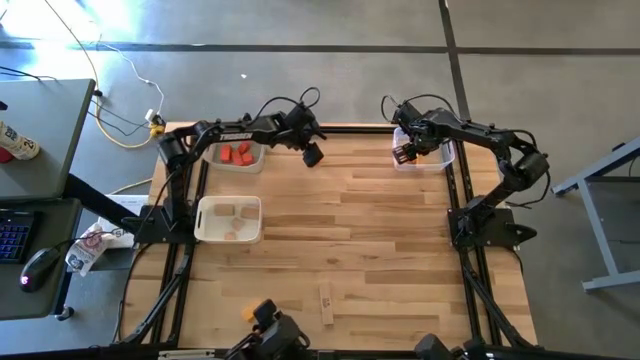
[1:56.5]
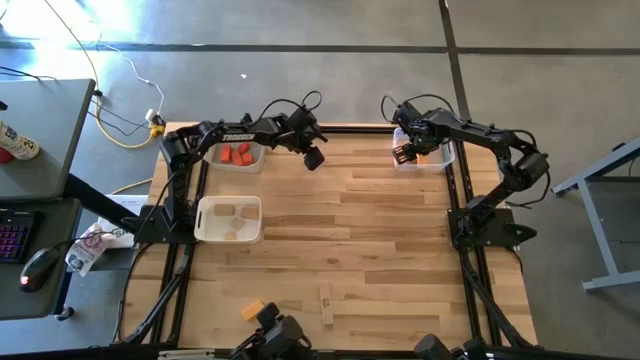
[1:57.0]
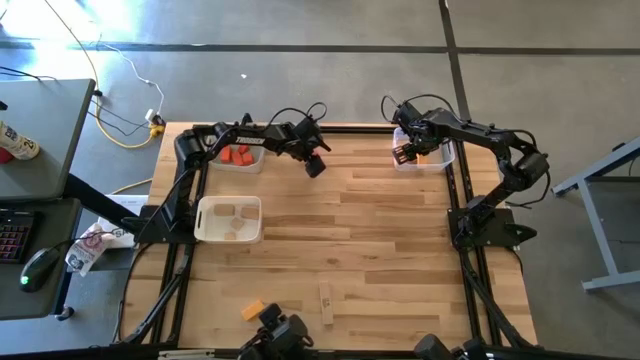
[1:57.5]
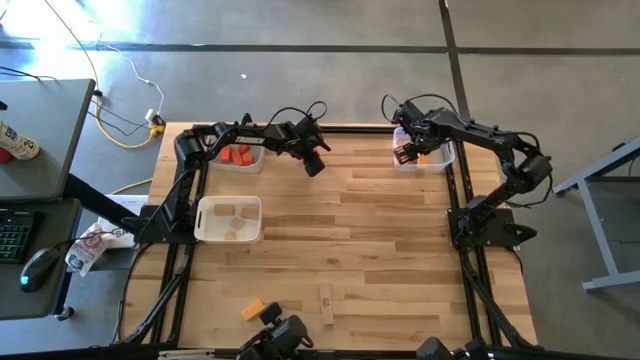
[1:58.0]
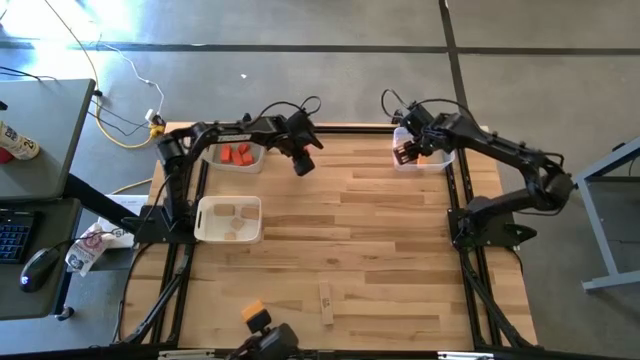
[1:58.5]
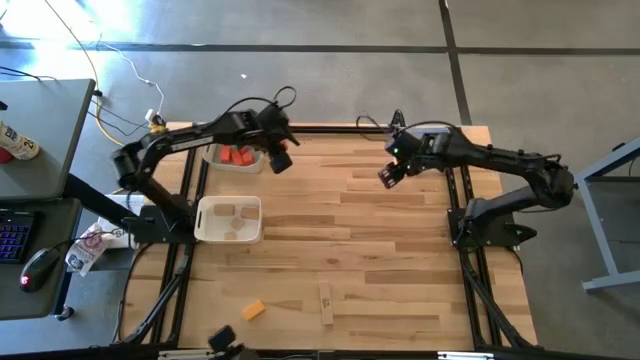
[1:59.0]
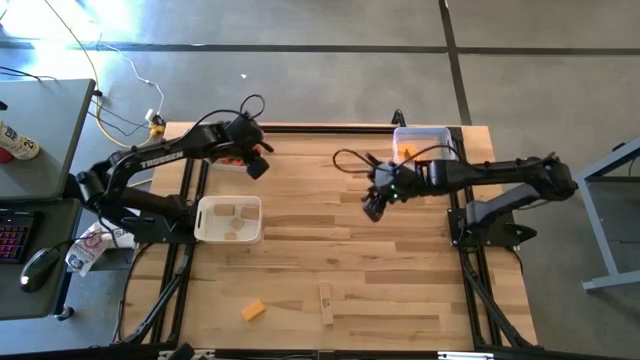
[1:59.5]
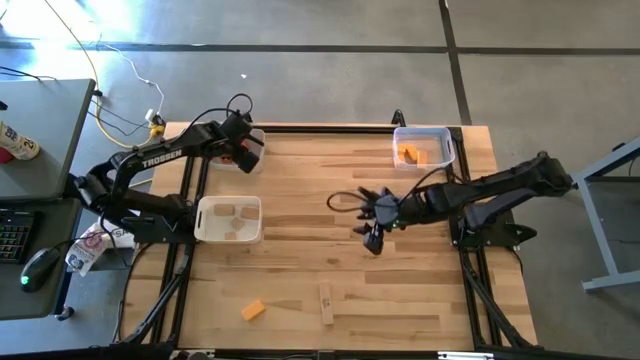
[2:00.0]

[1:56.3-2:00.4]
Task: Sort & place blocks by color
Put the orange block into the gray bin

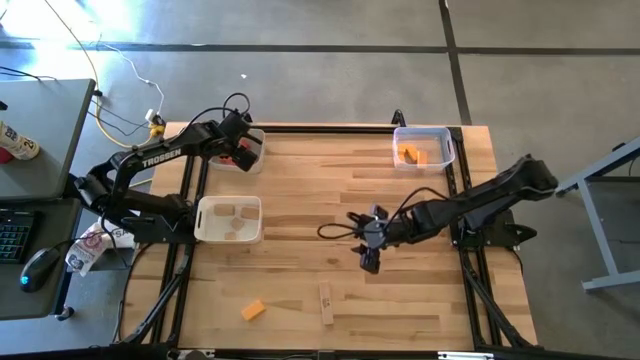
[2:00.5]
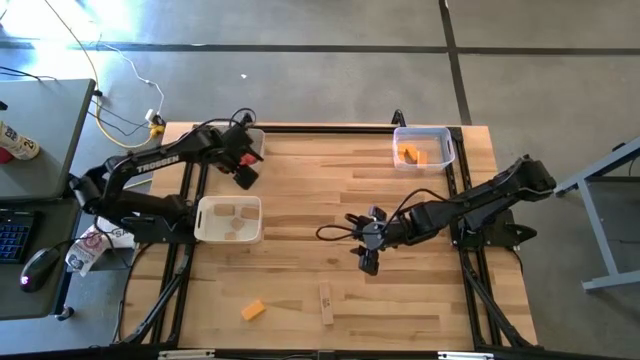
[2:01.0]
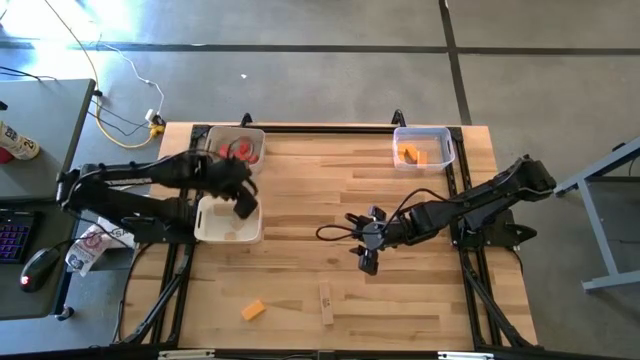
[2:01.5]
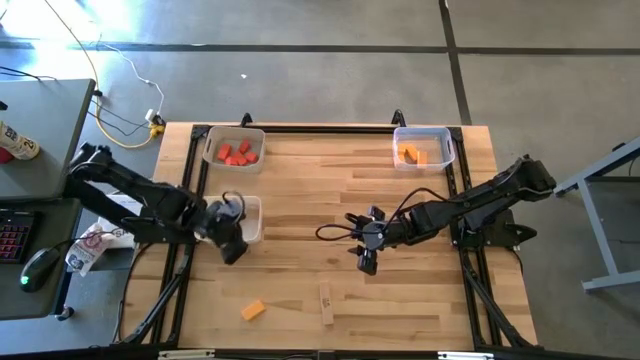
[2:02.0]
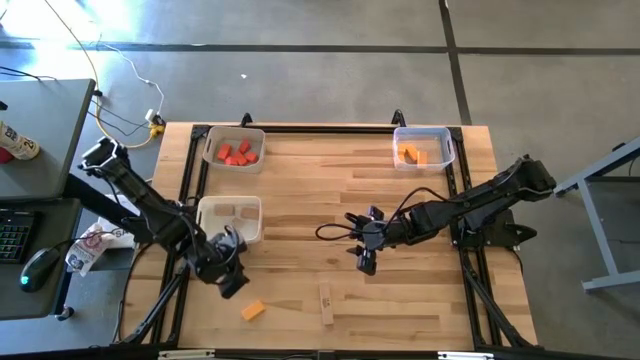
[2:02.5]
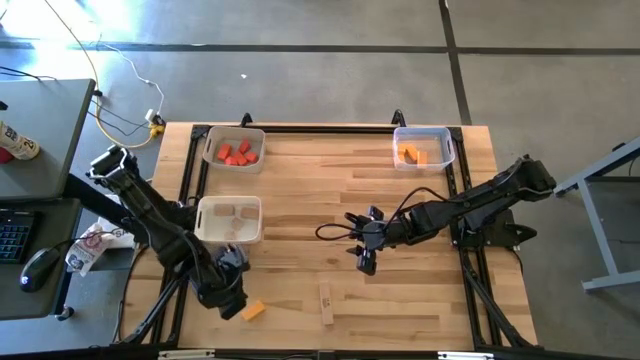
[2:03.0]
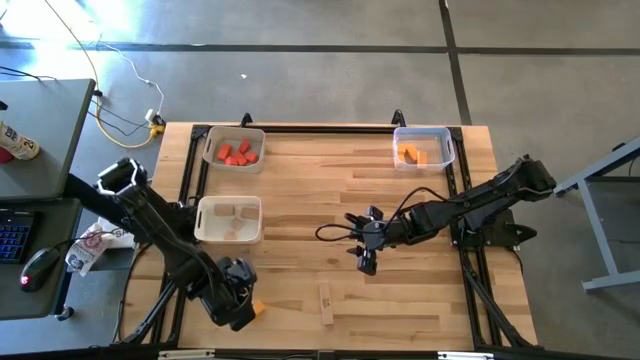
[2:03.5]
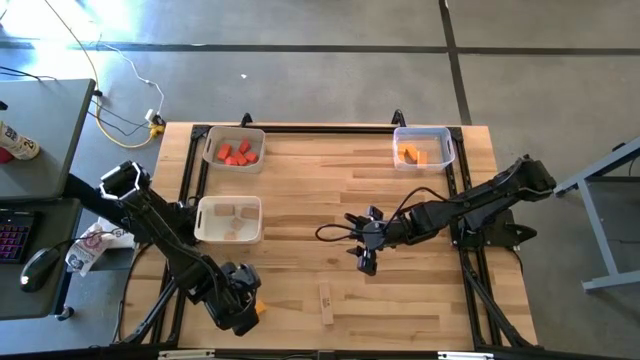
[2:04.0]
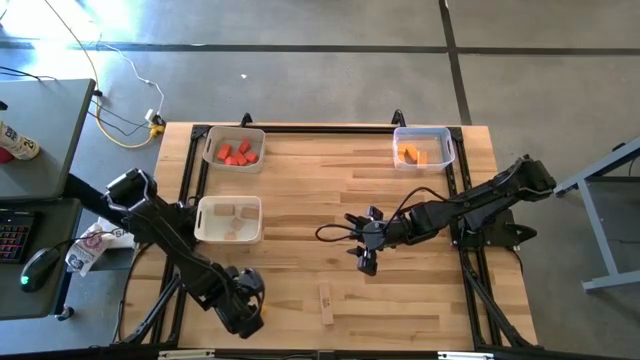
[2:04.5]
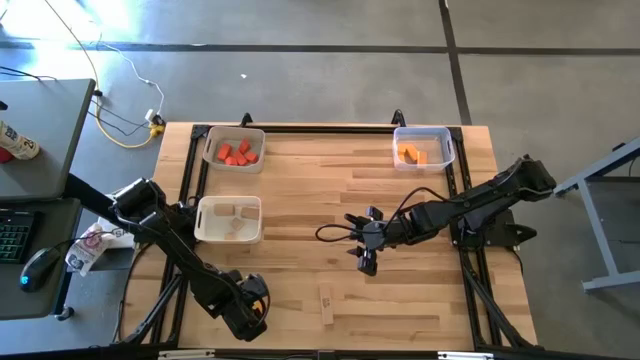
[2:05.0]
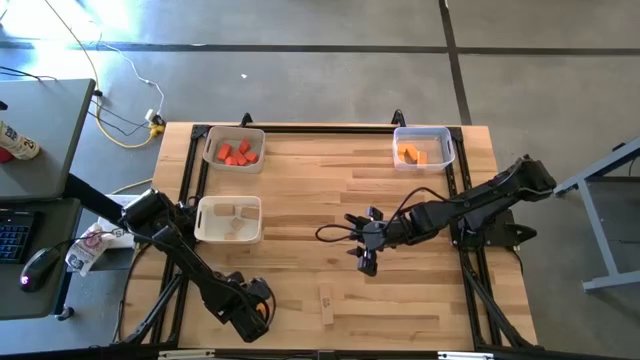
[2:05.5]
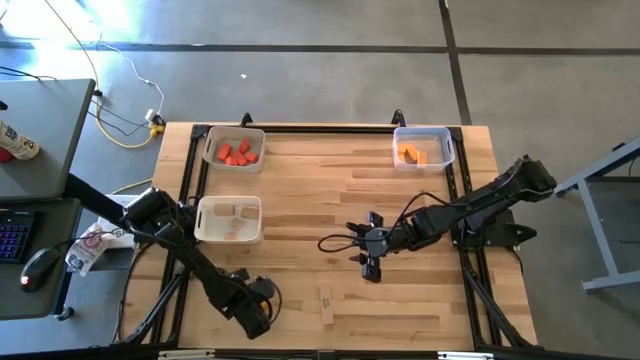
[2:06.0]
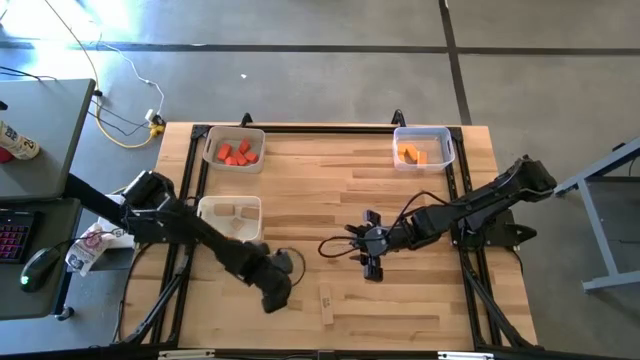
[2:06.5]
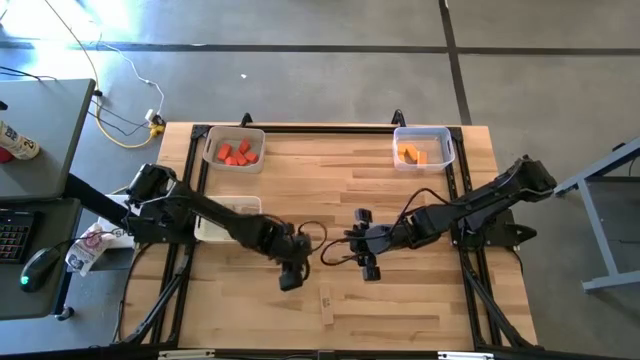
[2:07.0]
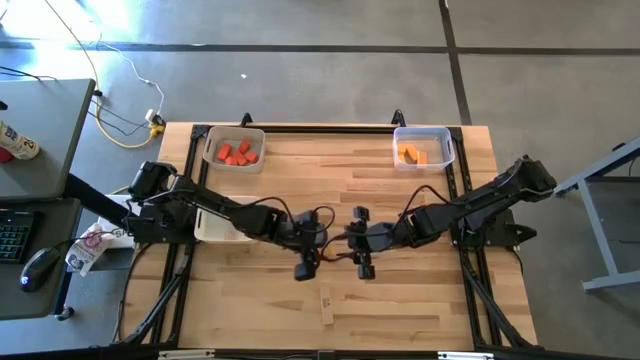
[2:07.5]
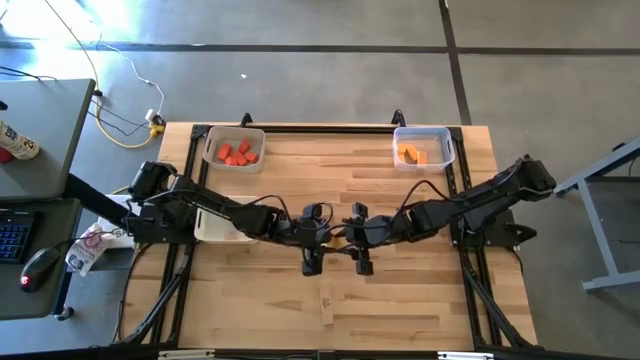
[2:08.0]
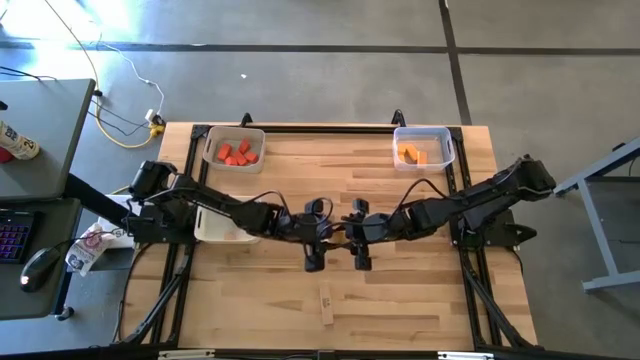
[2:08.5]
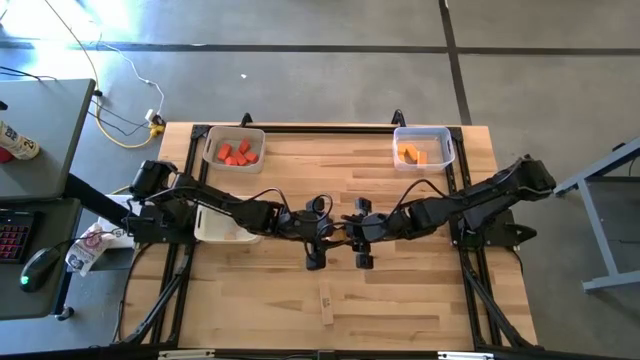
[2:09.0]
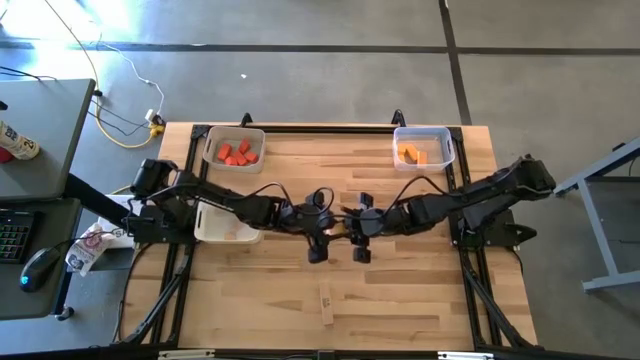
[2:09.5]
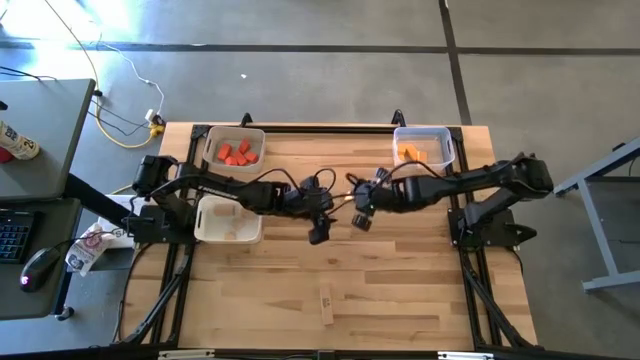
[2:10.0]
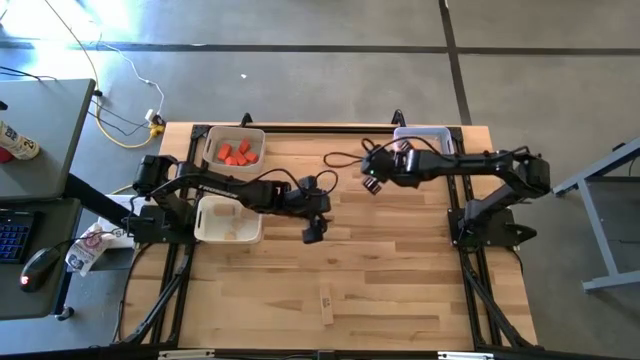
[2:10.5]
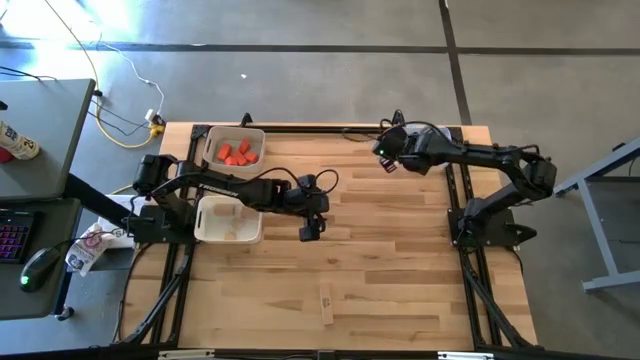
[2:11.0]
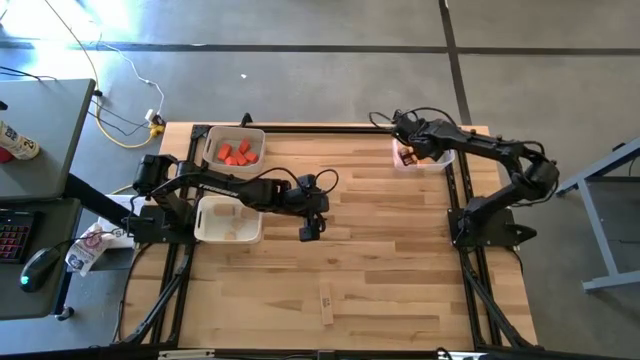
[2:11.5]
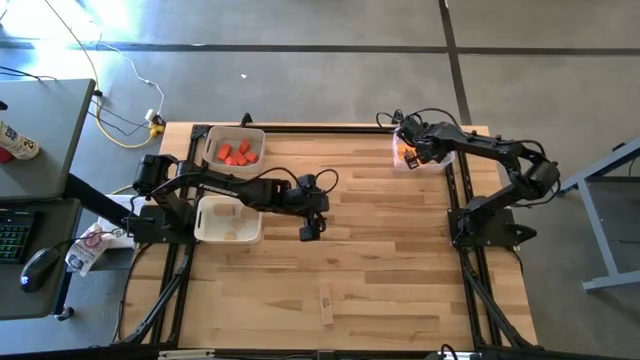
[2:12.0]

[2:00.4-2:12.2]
Put the yellow block into the transparent bin

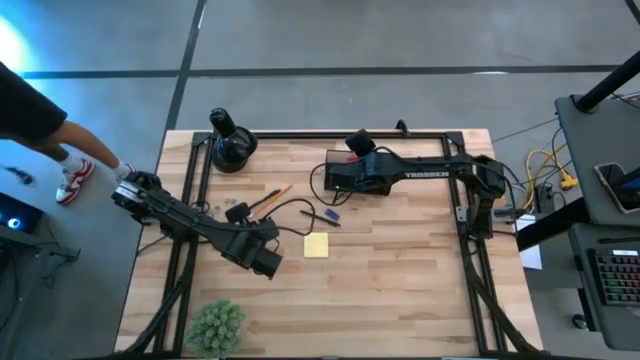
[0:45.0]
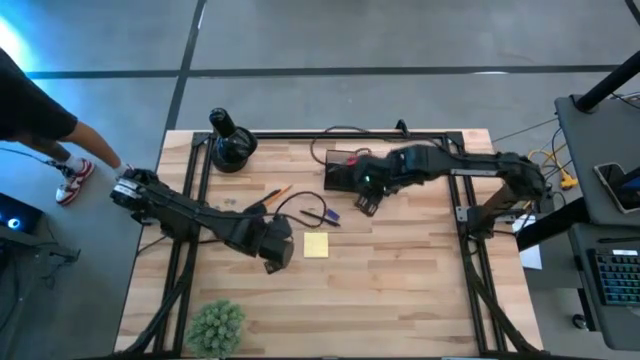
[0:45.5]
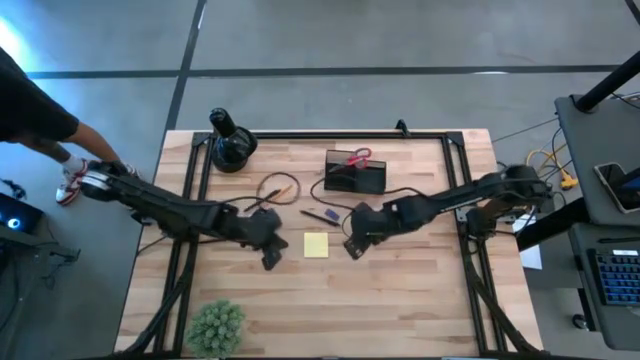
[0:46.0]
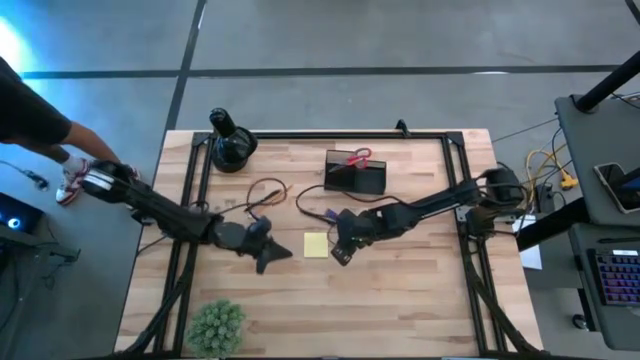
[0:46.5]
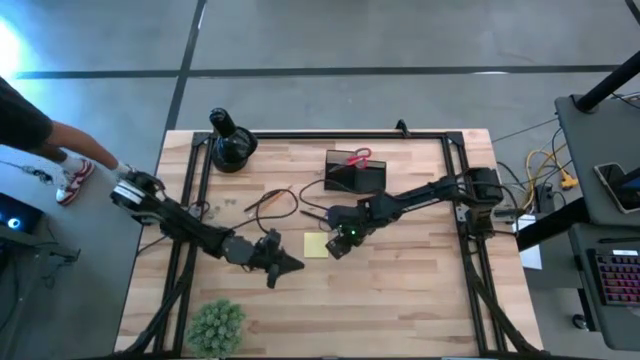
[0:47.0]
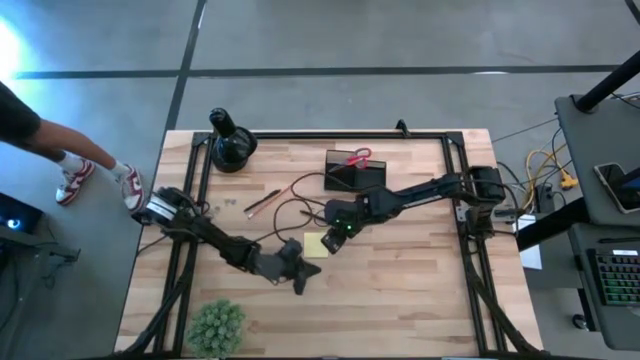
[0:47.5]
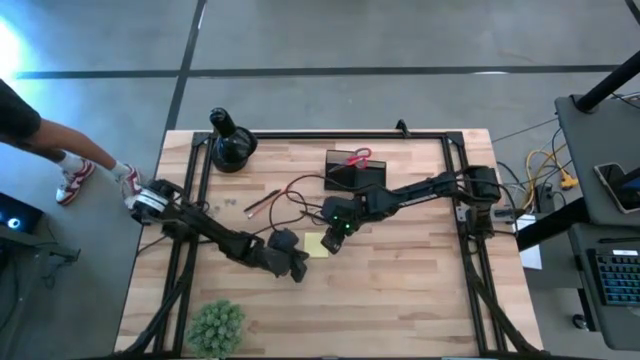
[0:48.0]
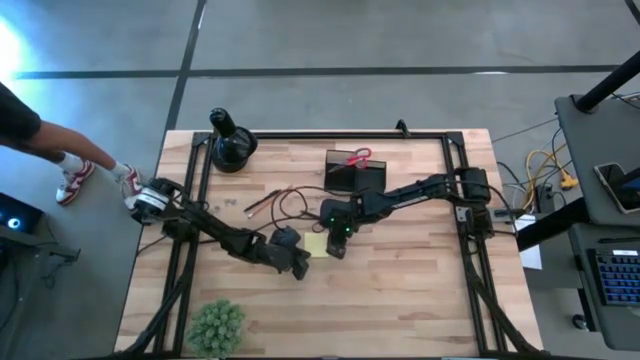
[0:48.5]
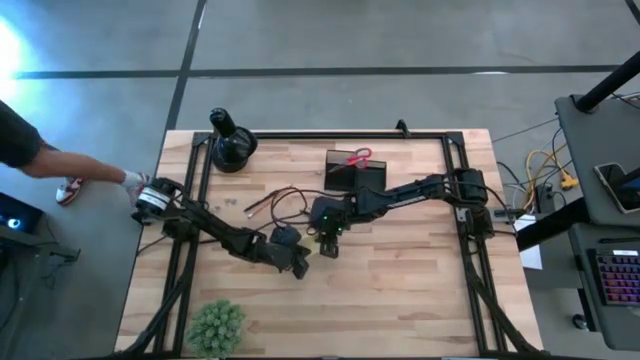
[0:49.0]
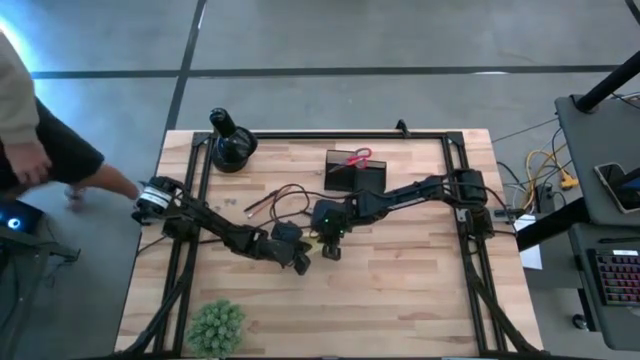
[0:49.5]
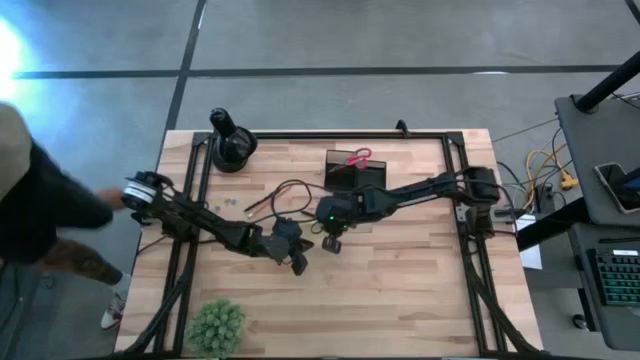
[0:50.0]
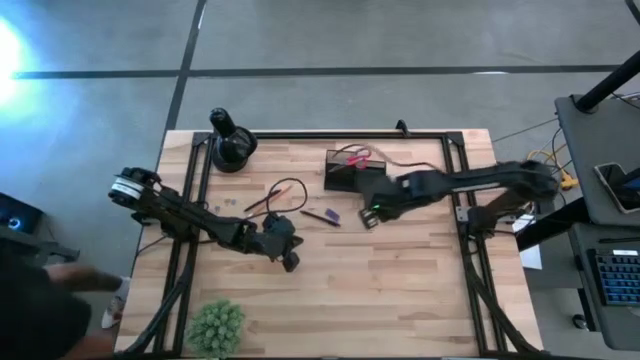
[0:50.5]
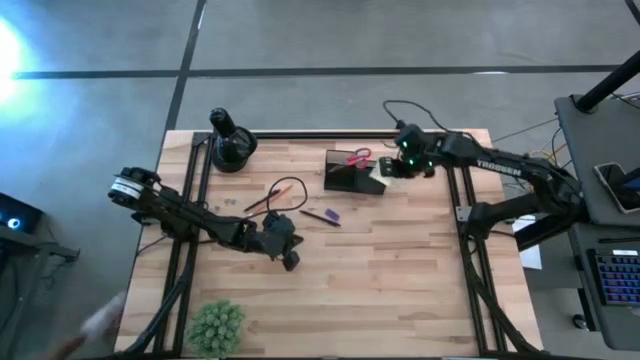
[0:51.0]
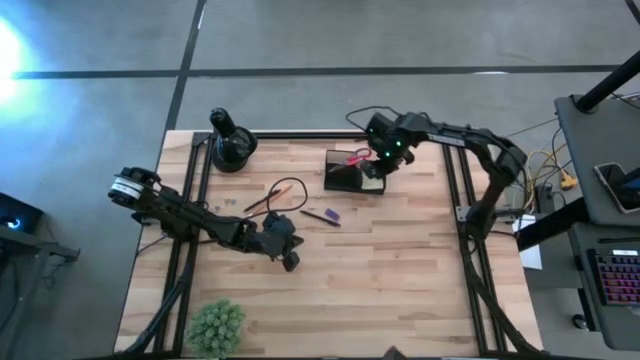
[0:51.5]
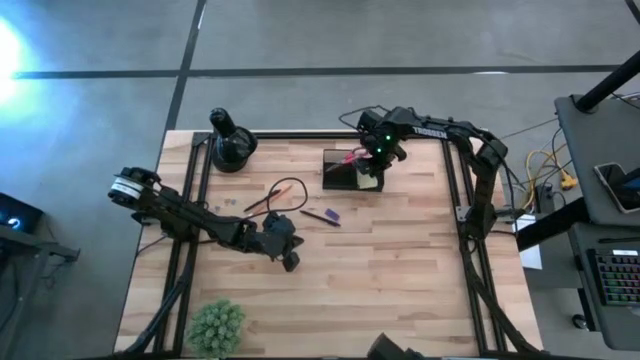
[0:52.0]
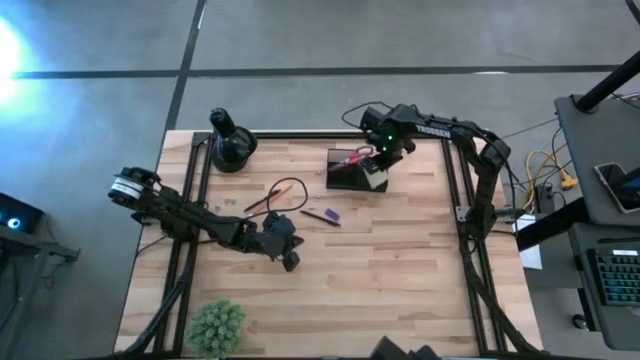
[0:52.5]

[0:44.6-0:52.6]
Task: Pick and place office supplies into organizer
Put the sticky note into the desk organizer
